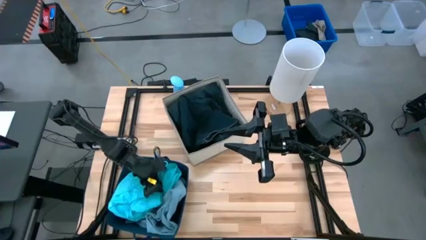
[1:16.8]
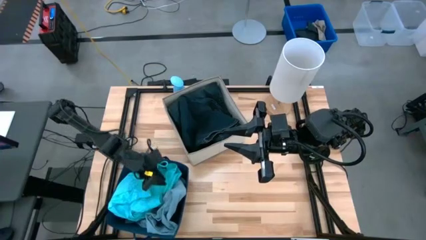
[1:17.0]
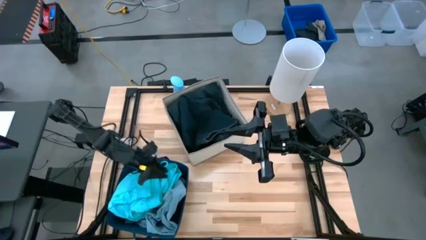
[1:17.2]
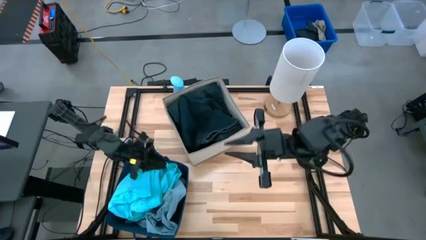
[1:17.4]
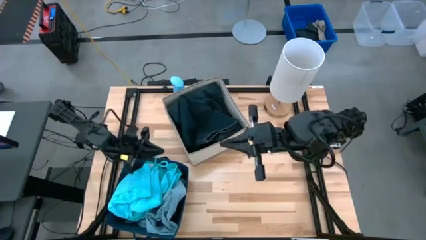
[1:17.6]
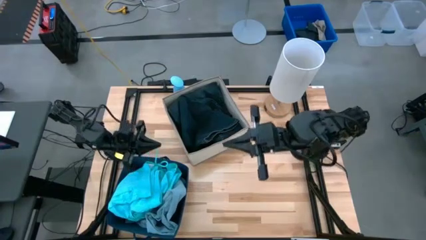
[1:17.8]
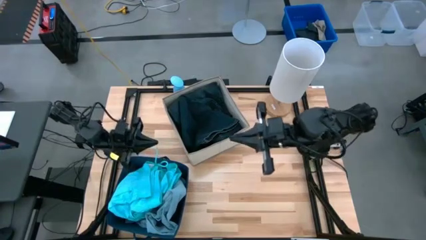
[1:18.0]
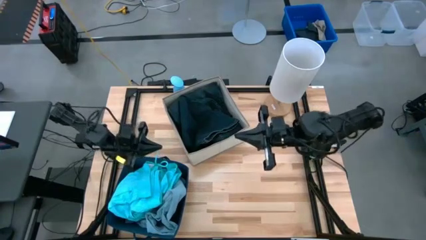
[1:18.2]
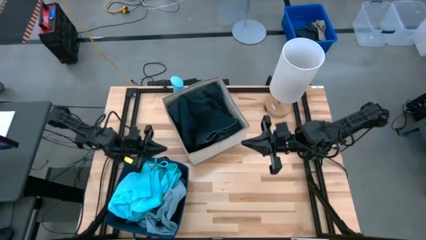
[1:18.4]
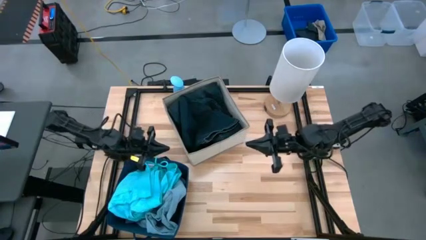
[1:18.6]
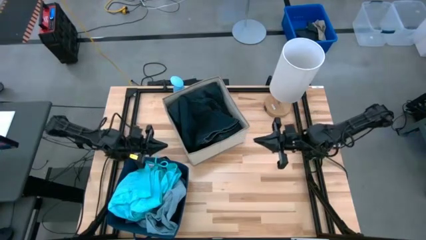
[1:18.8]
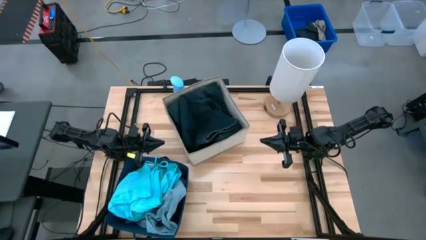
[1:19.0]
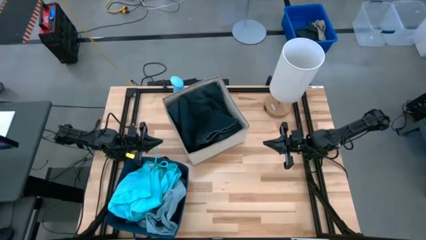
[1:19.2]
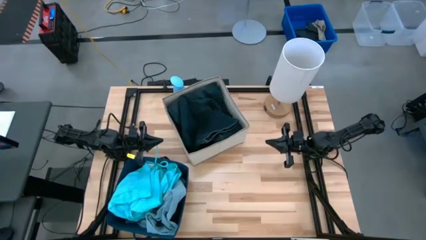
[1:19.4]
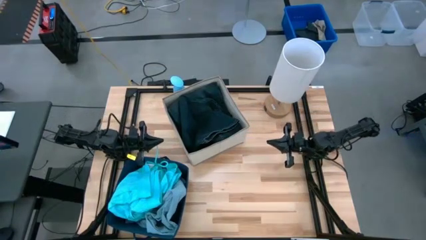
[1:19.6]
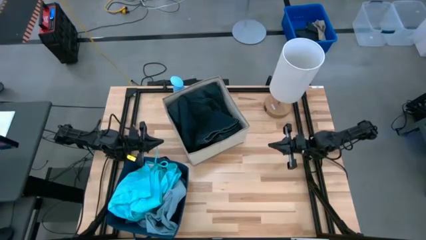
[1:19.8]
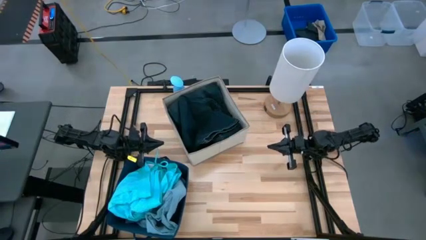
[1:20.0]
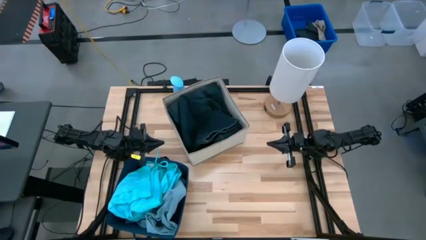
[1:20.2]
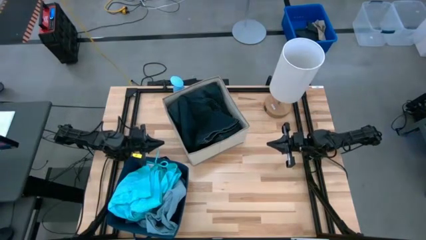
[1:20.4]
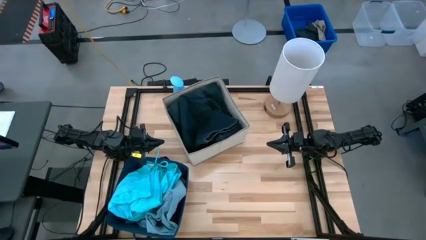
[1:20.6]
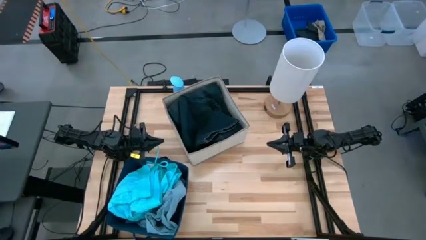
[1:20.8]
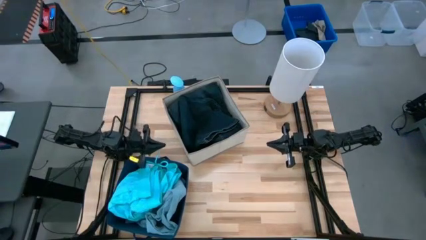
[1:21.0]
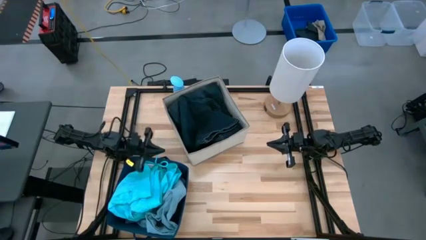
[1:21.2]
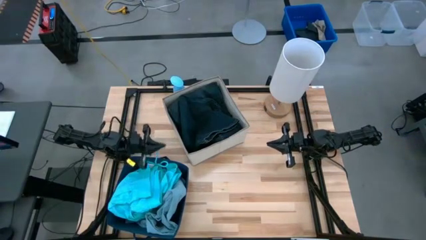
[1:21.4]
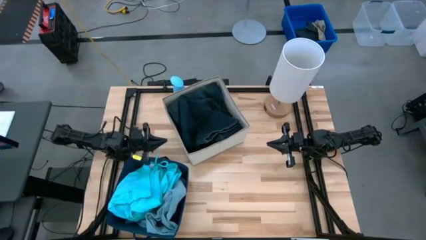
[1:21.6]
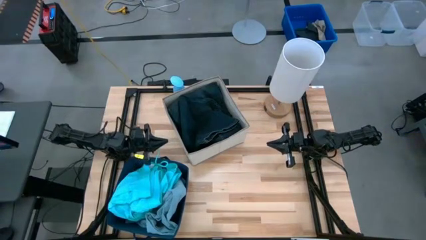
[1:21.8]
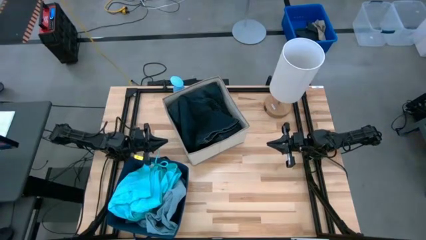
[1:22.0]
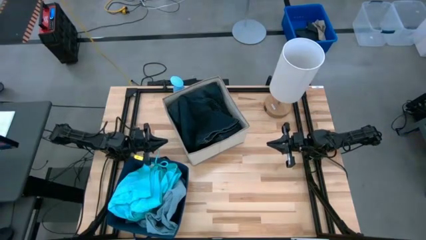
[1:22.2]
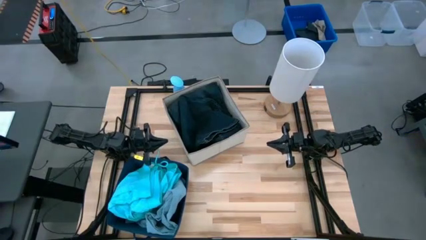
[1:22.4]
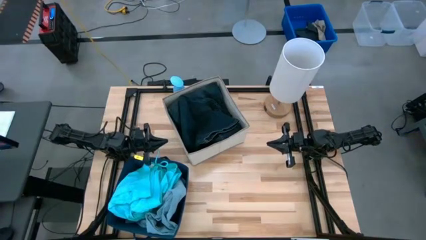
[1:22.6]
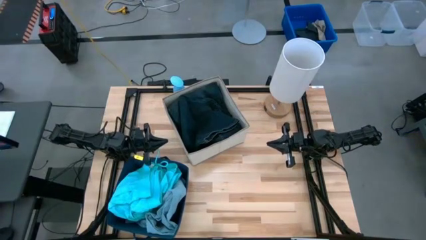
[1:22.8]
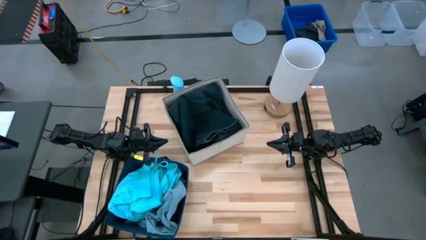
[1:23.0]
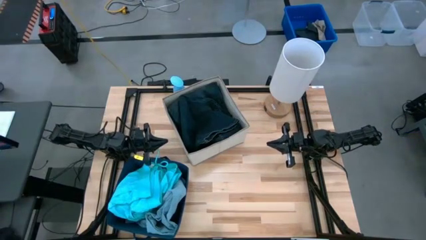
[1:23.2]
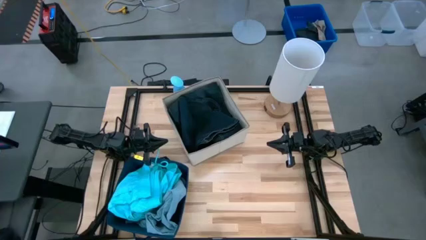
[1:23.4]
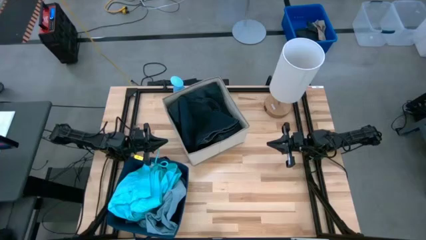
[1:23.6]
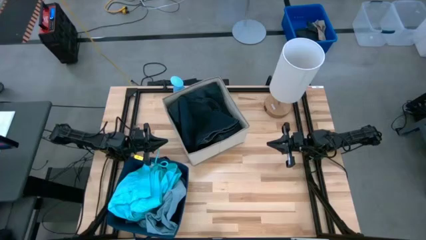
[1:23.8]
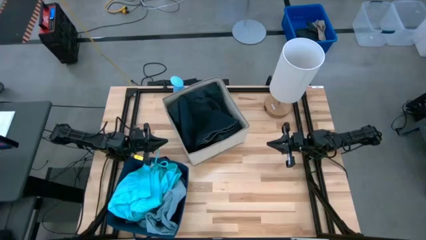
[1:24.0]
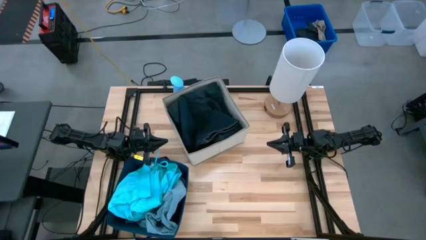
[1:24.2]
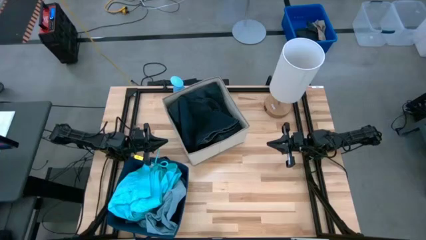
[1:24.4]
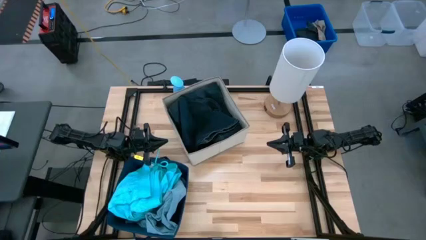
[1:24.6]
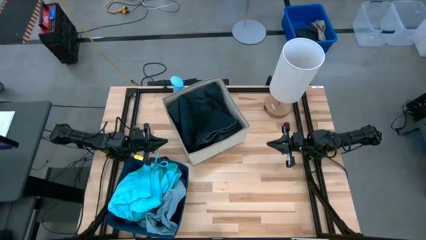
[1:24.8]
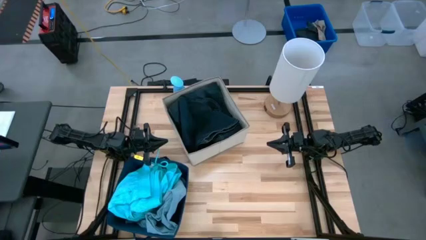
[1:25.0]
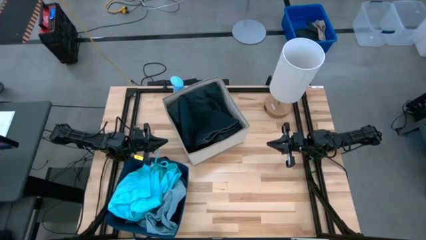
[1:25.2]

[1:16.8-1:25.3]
Task: Sort clothes
Return to Home Position

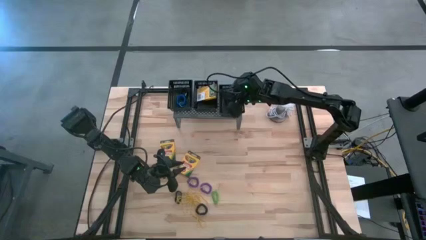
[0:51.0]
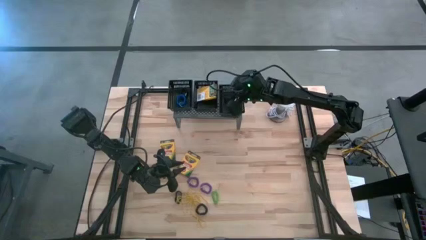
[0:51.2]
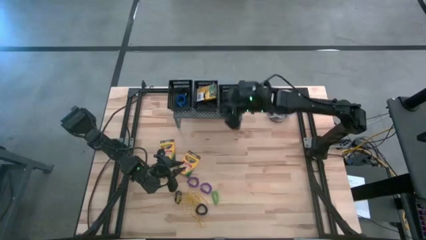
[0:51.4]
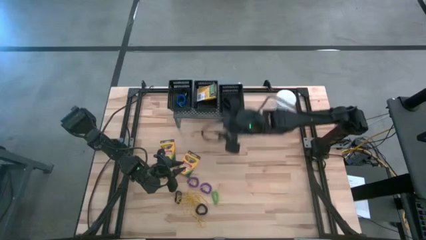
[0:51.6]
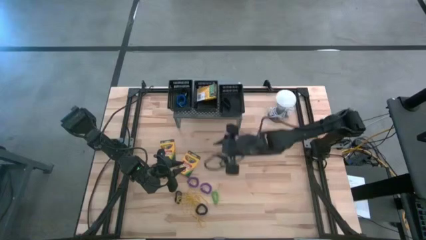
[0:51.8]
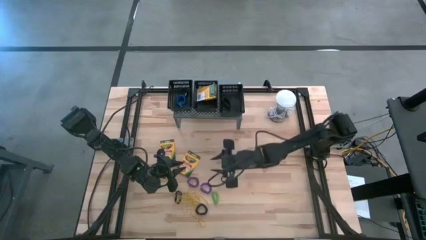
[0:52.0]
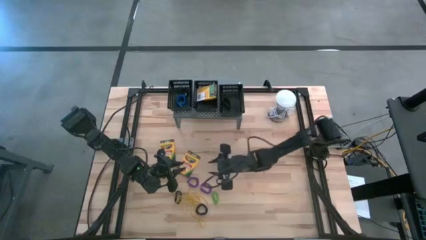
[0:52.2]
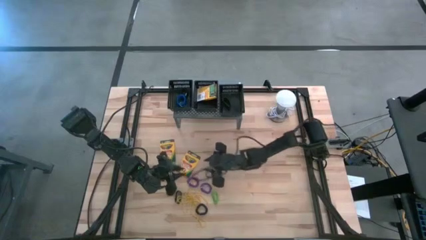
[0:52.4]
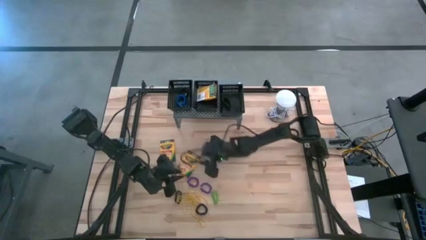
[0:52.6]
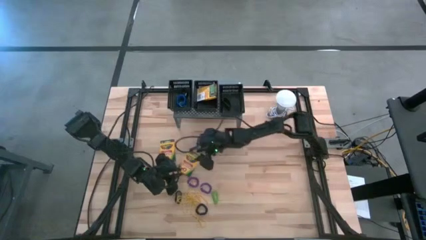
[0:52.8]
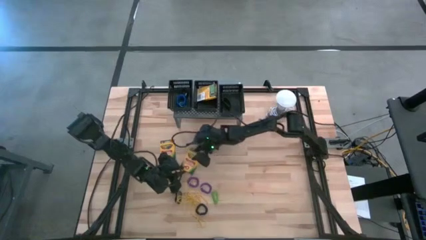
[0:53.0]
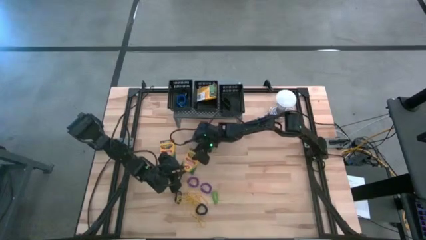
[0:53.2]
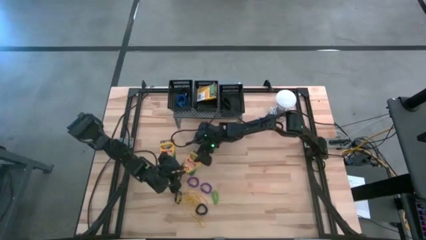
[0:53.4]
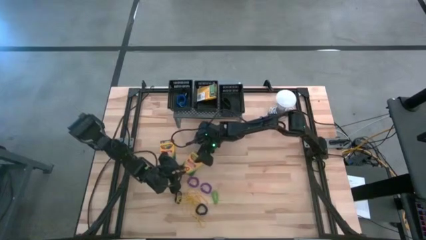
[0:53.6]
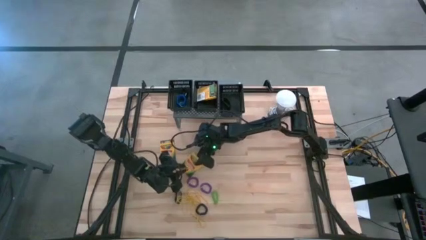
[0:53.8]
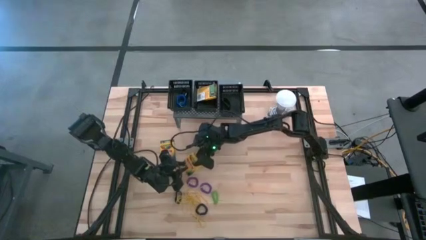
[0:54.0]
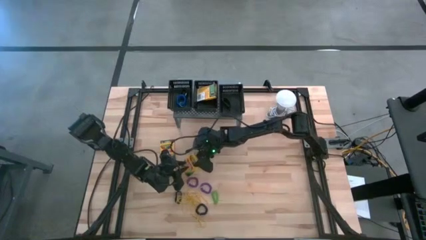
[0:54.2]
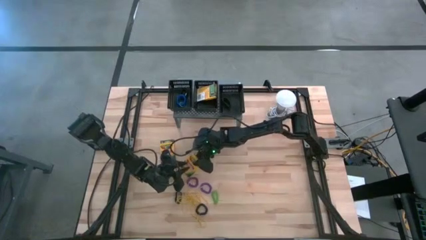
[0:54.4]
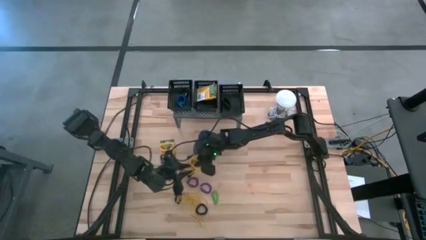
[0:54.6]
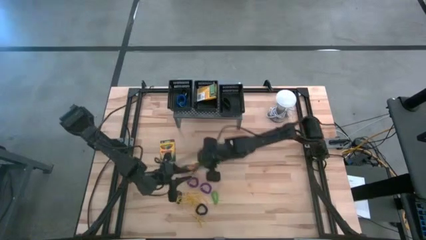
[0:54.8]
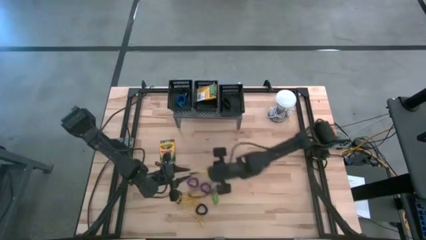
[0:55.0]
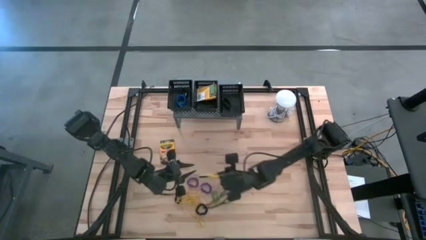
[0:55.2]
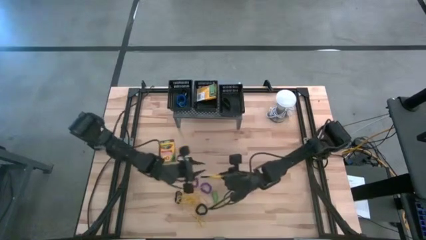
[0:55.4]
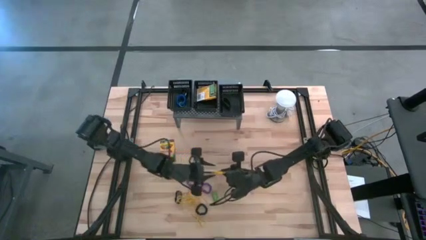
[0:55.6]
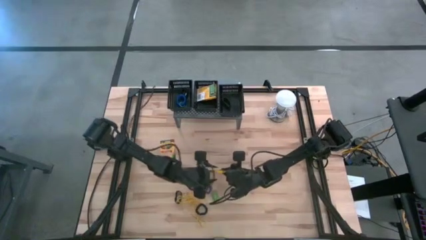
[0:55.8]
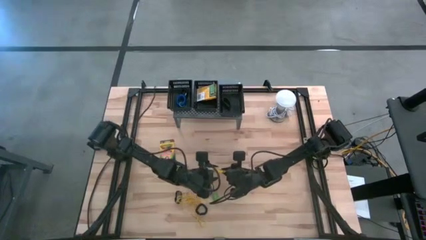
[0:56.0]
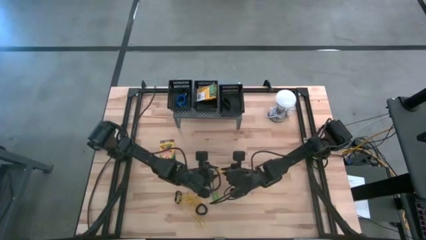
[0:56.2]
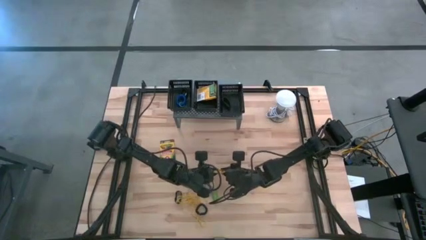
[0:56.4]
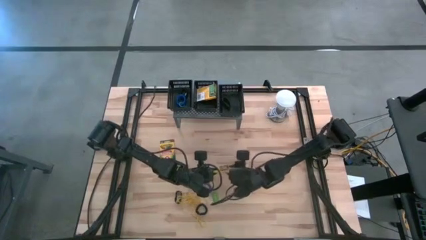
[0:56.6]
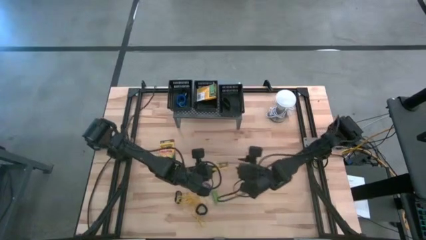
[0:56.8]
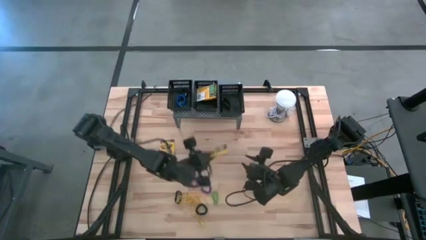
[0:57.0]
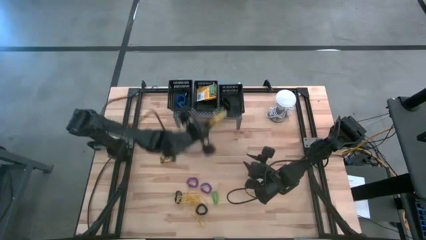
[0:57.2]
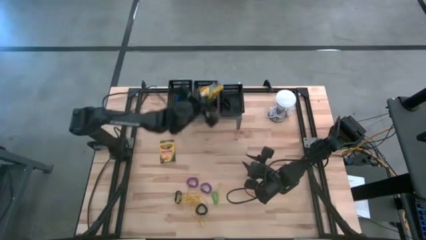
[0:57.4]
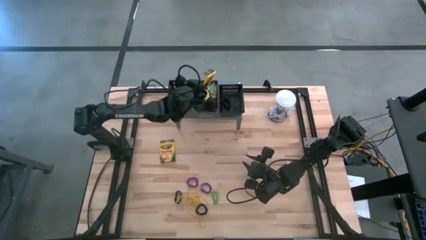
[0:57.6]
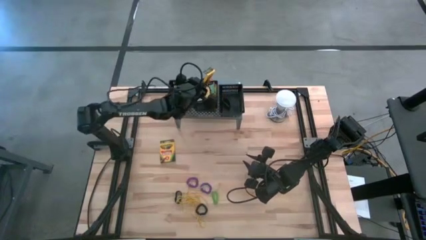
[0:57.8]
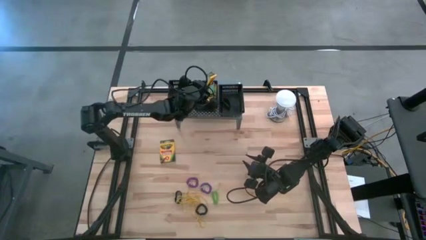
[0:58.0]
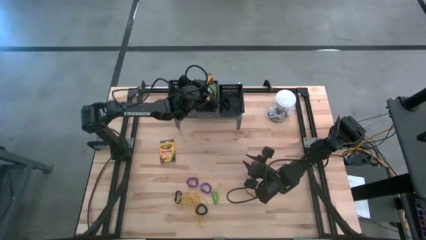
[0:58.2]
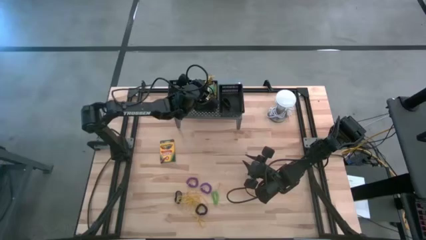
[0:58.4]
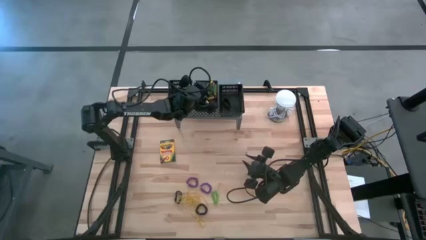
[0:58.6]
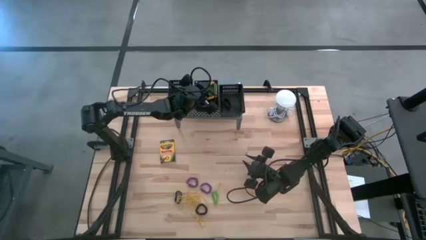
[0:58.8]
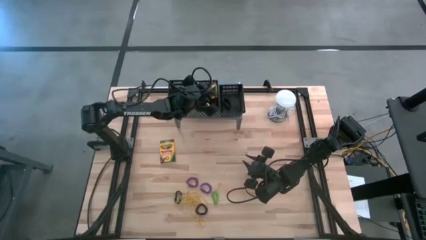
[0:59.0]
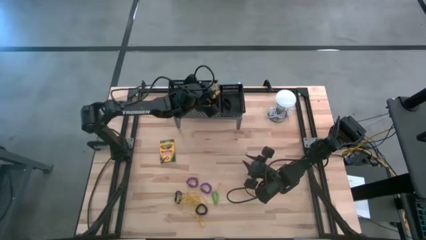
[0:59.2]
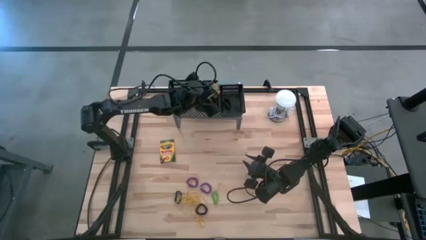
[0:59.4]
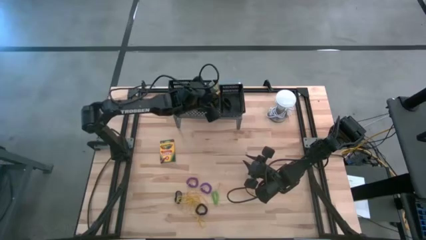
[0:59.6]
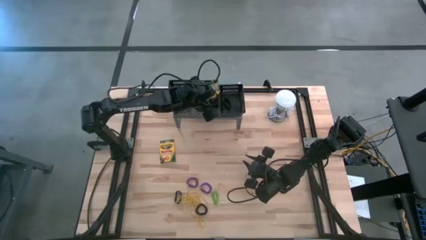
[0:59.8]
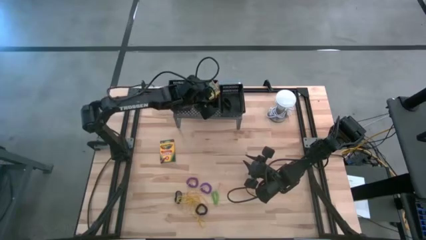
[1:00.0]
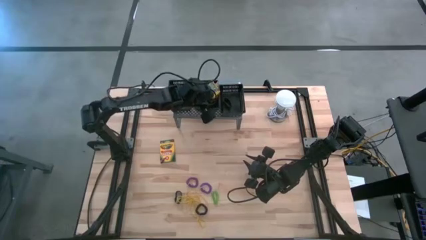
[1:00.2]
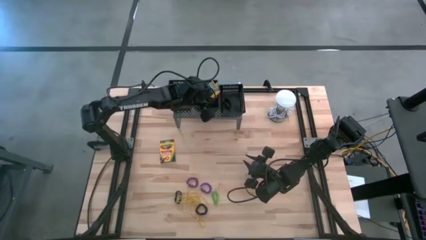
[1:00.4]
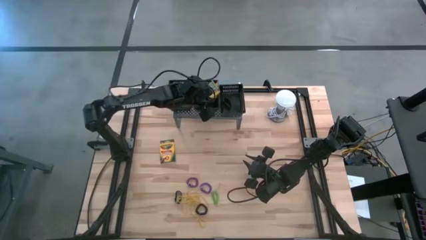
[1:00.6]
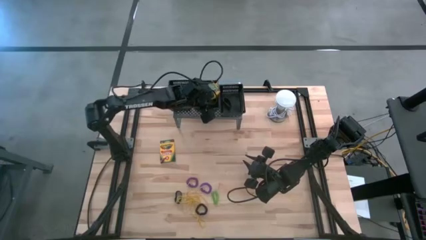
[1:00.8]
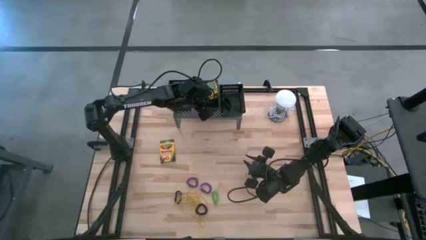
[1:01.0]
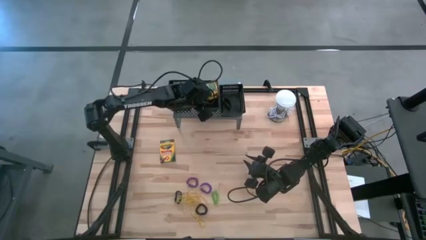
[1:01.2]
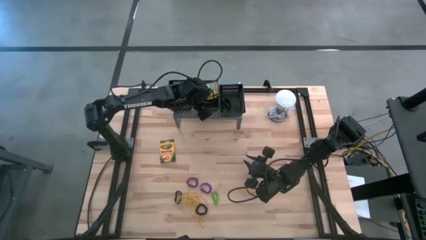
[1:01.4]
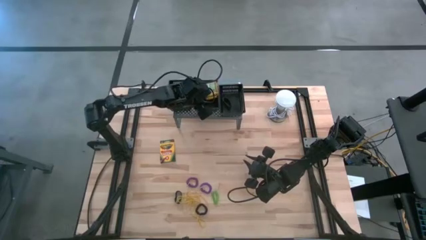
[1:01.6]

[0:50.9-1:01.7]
Task: Pick & Place Office Desk Supplies
Put the yellow crayon box into the middle black bin on the shelf
